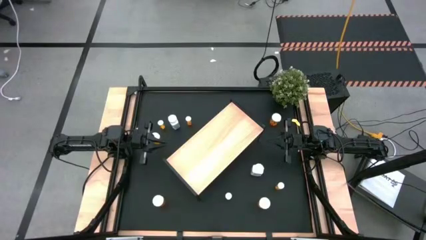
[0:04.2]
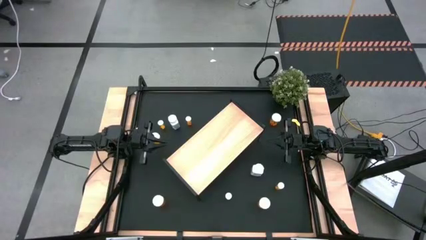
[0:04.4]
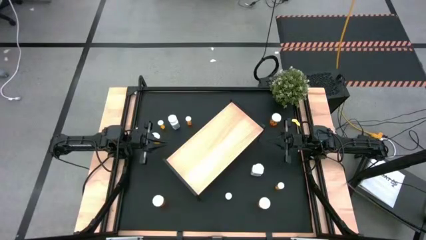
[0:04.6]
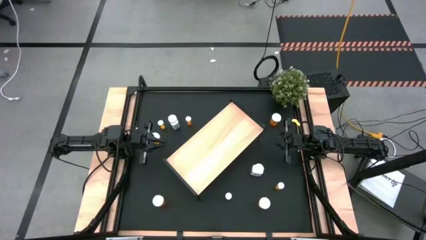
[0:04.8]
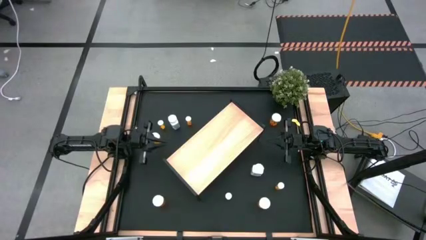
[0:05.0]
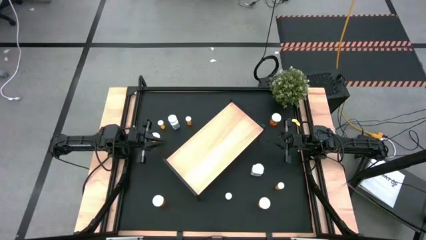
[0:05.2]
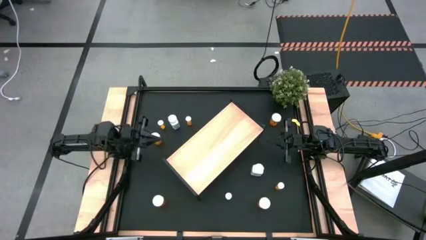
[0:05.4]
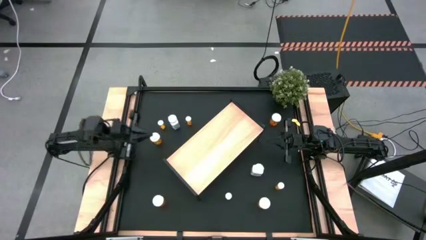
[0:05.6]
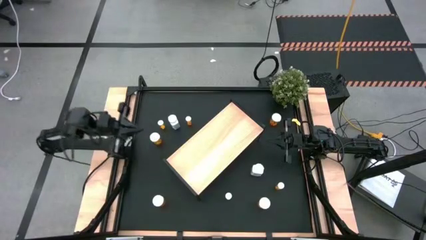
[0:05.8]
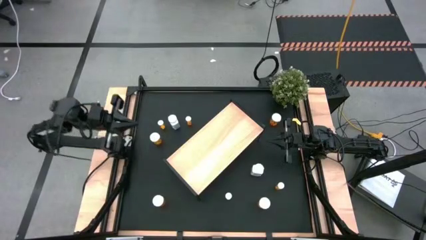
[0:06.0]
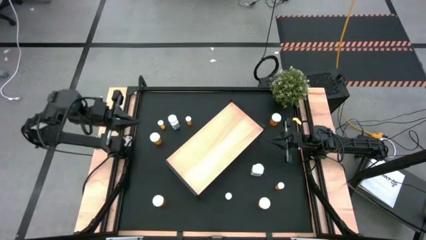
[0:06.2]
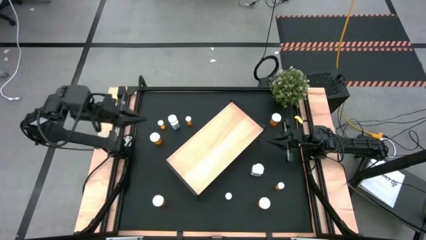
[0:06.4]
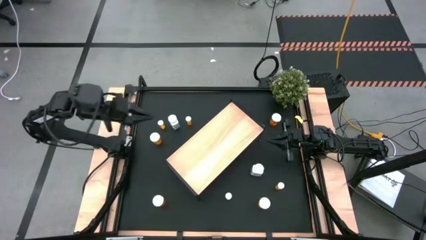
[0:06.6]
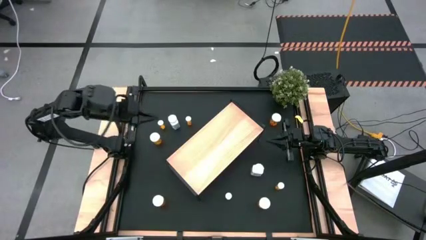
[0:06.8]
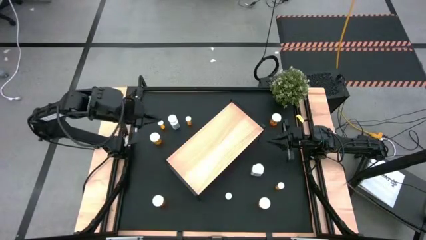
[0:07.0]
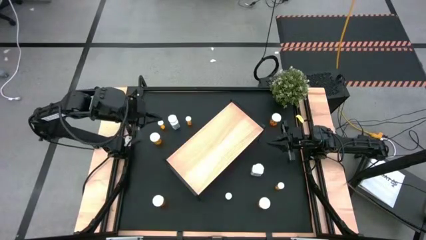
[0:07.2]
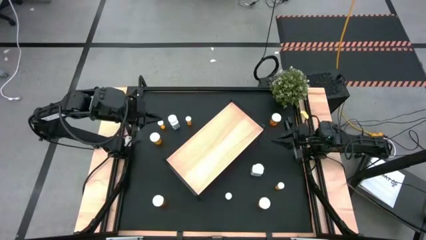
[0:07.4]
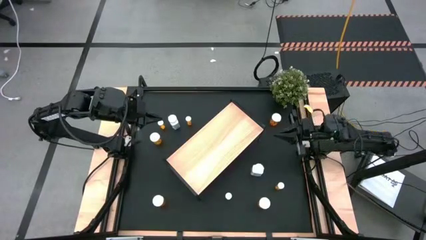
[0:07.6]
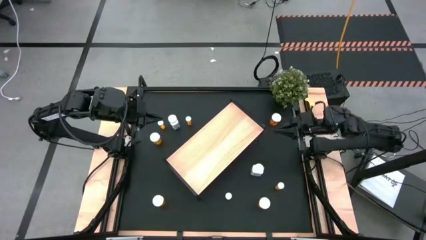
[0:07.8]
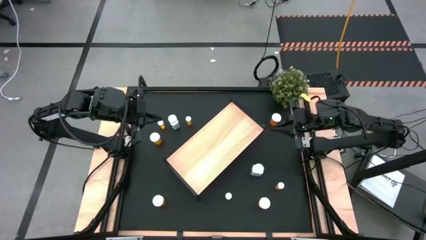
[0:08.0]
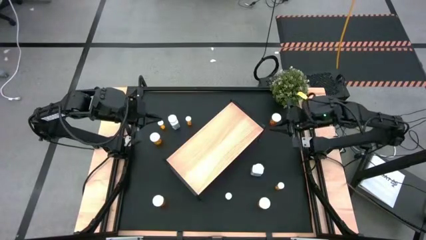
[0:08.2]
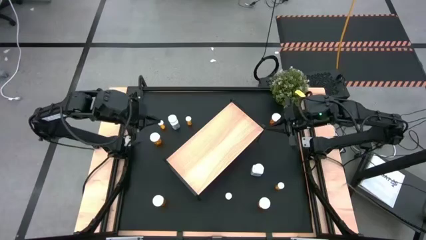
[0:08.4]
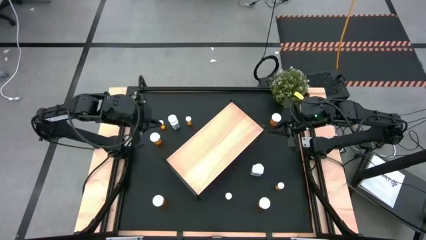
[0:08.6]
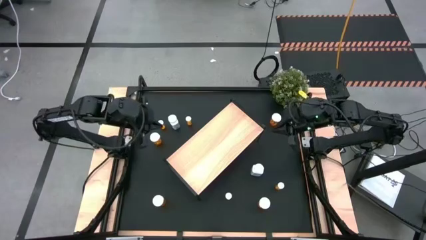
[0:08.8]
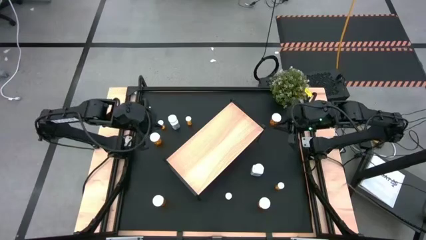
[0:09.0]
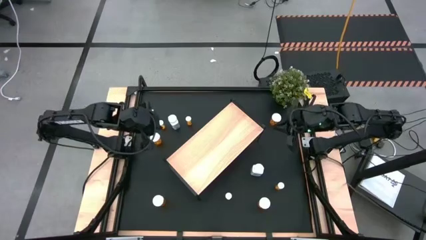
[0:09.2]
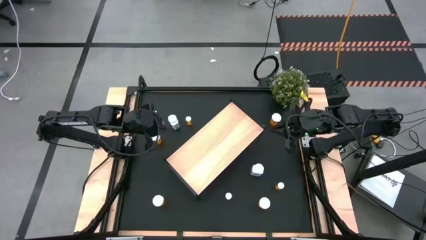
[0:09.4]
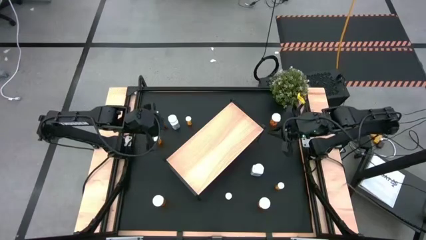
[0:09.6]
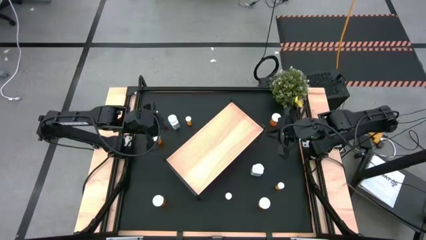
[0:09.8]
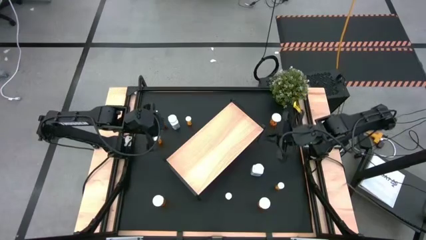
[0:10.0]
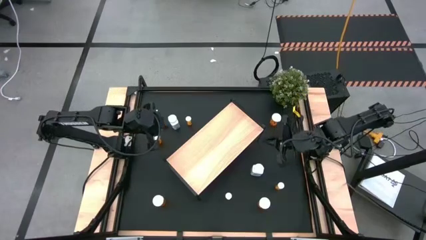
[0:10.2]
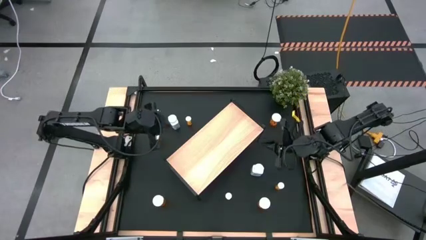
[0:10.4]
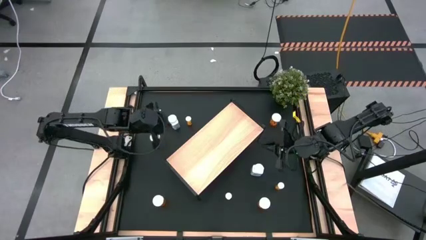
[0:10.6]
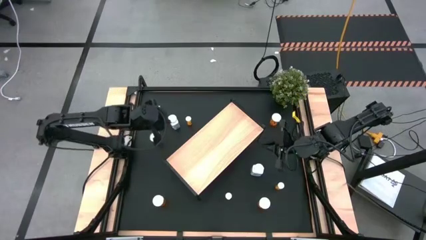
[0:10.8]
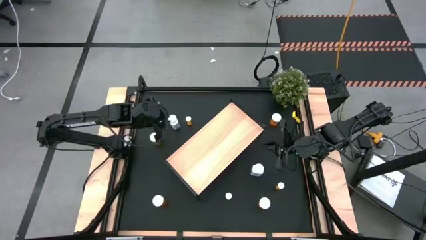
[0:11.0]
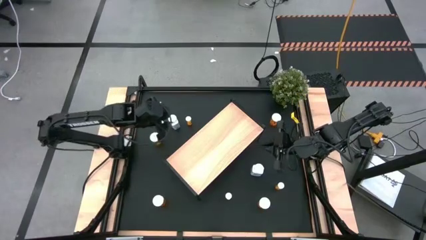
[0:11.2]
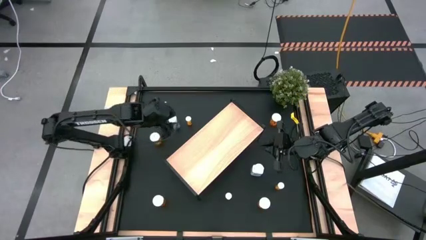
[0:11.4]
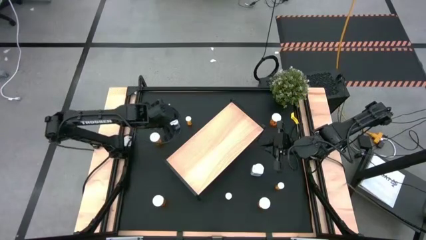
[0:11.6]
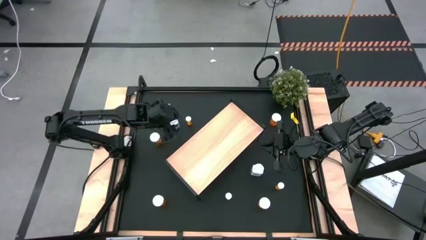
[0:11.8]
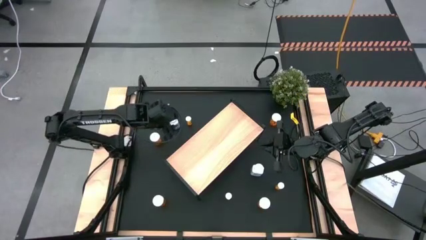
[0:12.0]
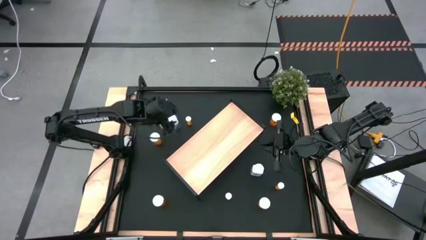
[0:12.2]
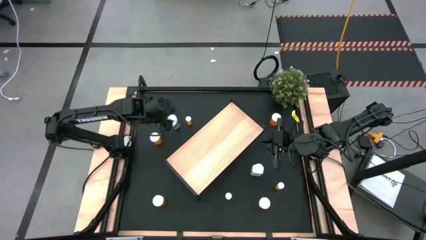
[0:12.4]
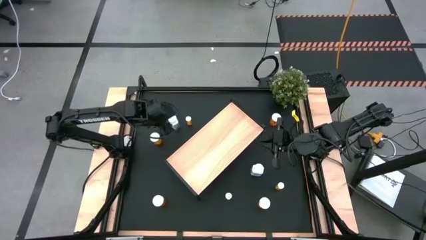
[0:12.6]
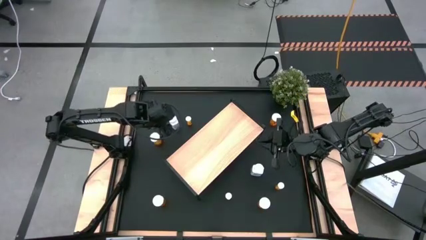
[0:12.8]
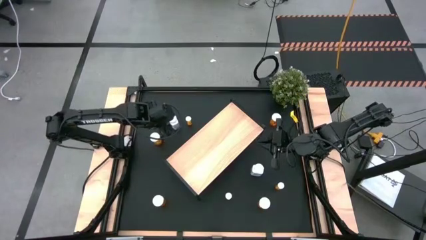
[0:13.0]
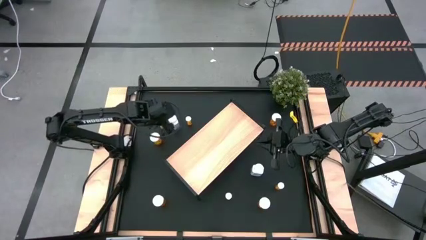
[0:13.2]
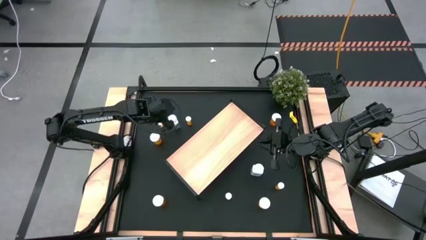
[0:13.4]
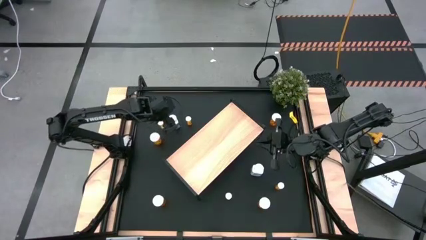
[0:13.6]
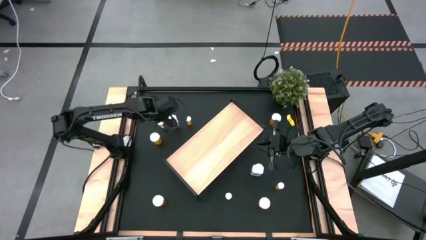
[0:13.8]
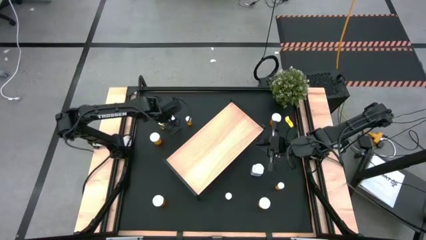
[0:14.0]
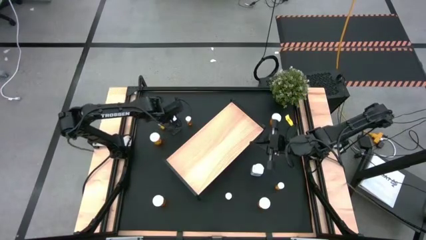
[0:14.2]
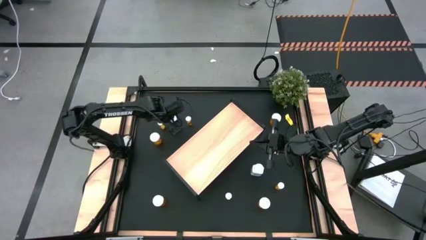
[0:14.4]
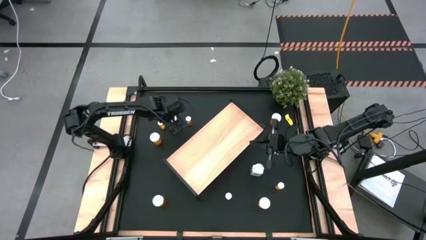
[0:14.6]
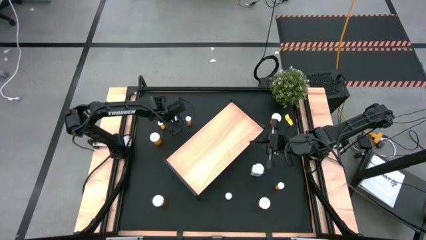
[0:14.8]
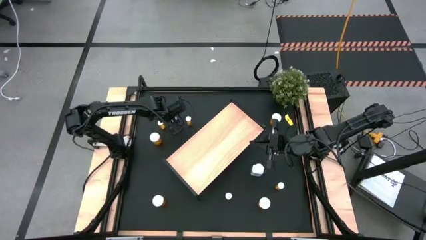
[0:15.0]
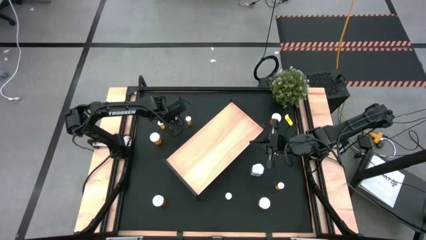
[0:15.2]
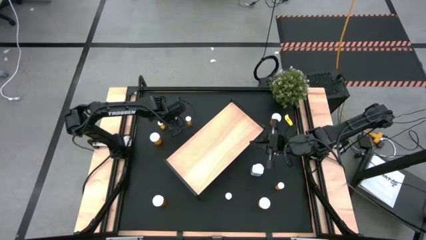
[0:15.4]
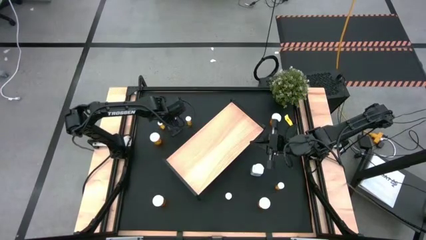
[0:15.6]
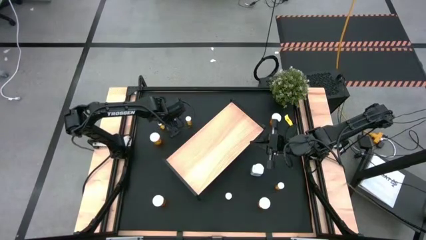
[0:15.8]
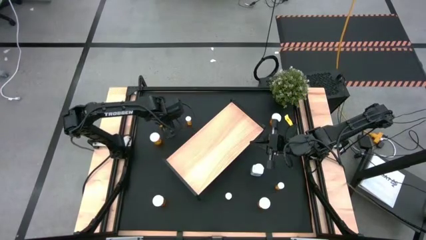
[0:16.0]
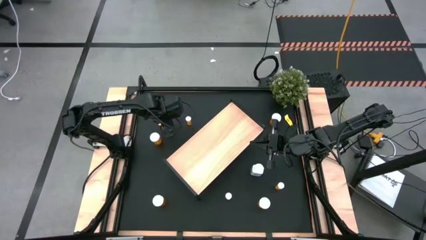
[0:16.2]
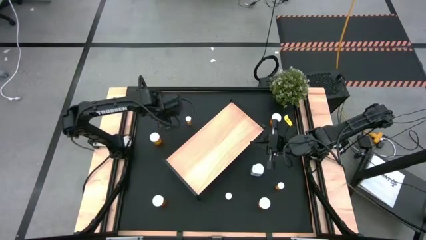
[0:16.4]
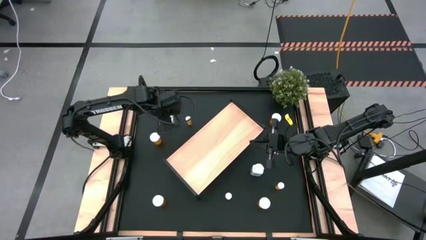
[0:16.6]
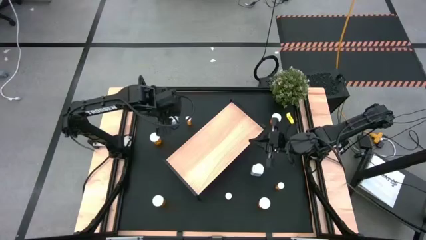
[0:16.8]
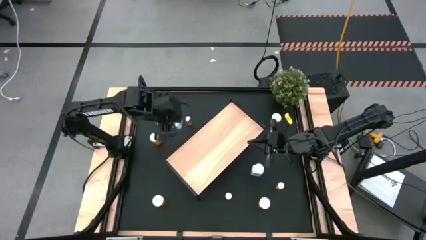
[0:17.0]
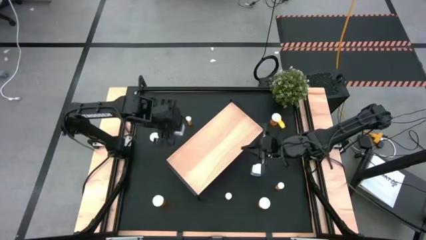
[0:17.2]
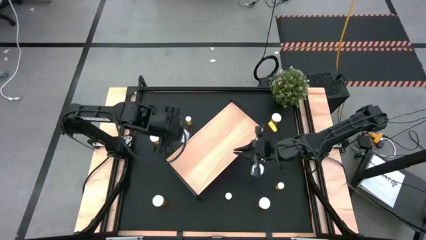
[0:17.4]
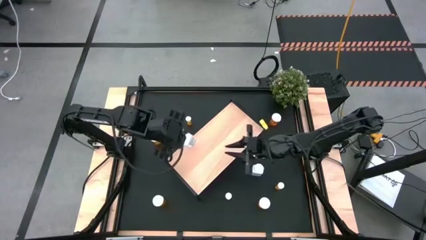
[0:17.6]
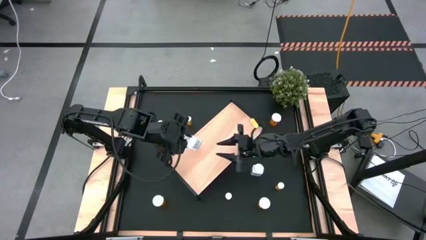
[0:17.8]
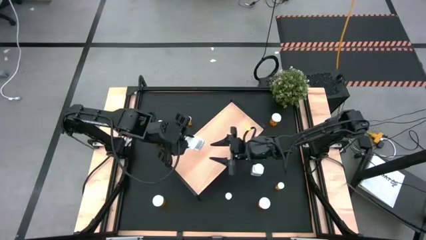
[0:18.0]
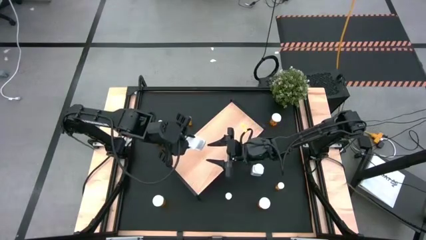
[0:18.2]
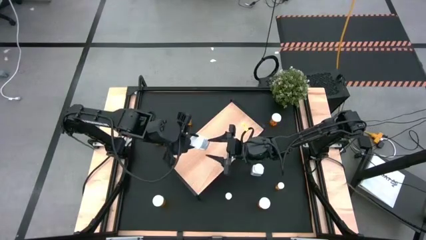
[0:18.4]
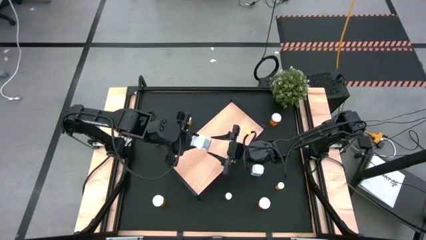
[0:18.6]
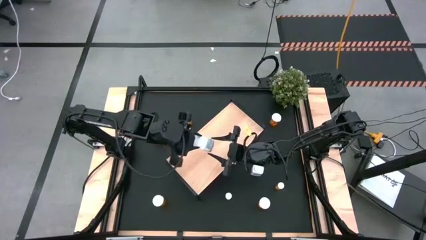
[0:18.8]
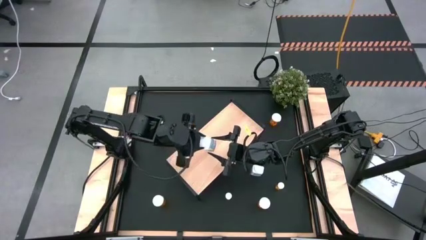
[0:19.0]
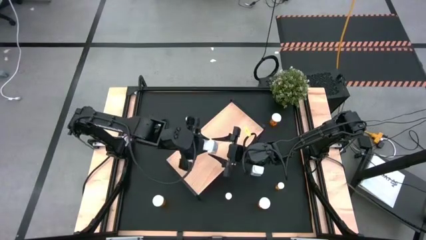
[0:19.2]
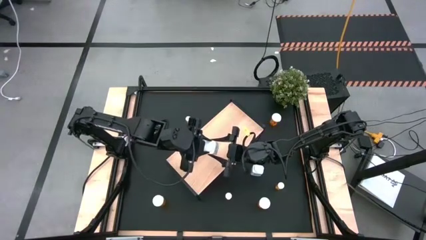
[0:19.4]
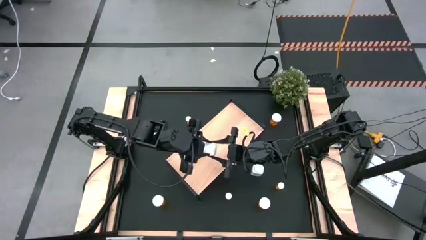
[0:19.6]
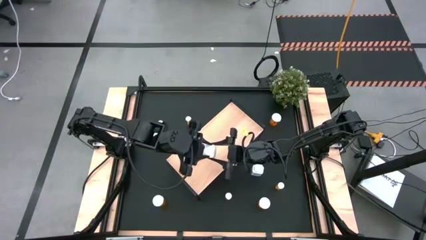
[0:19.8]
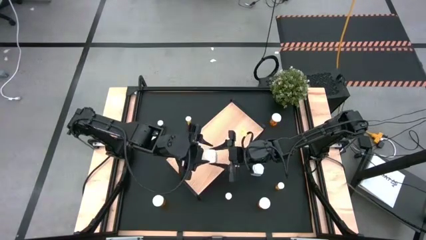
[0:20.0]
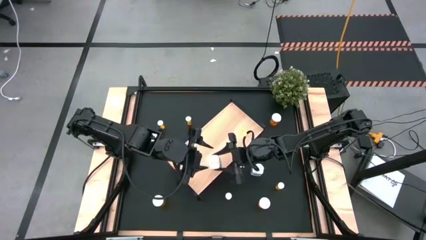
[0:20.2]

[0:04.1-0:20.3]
Task: Pick and place medicine bottles onto shelf by color
Put the white pill bottle on the shelf
